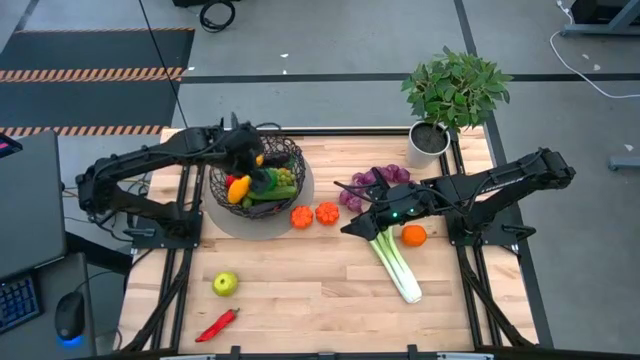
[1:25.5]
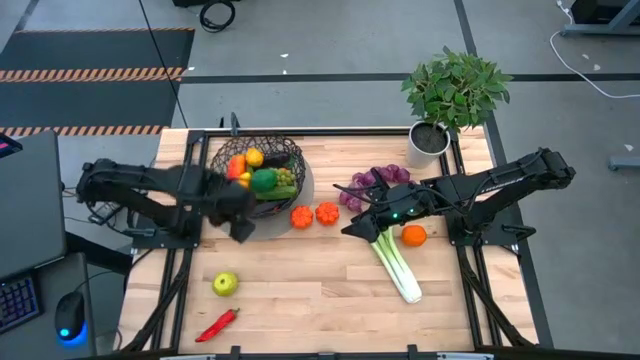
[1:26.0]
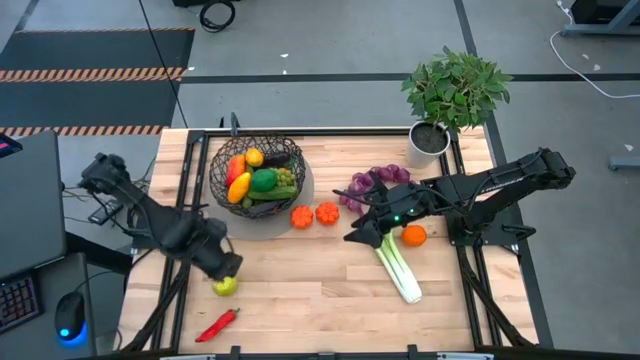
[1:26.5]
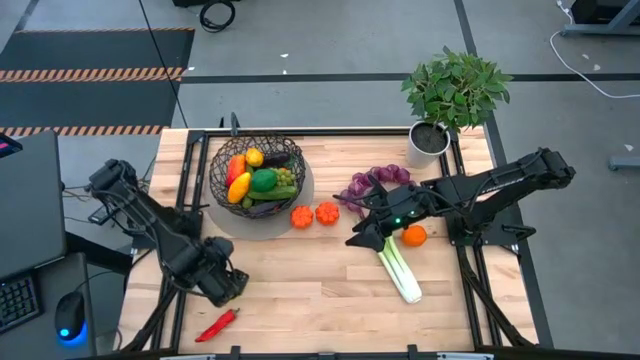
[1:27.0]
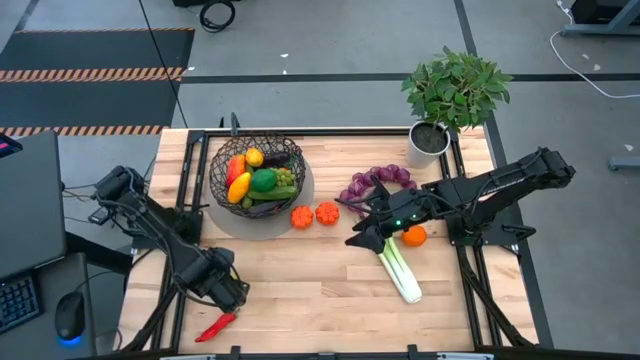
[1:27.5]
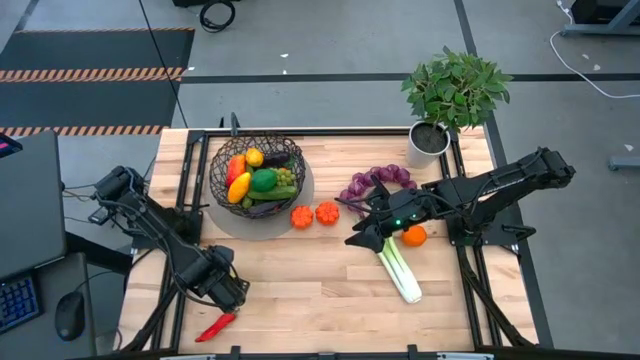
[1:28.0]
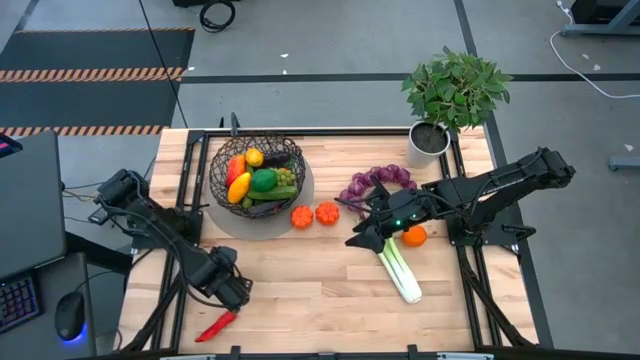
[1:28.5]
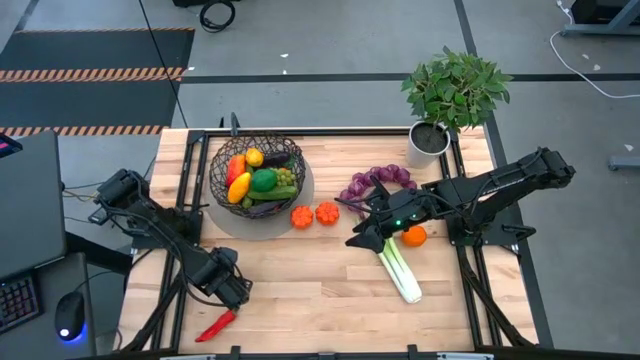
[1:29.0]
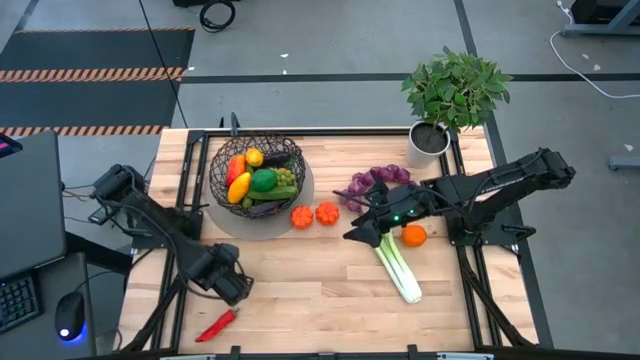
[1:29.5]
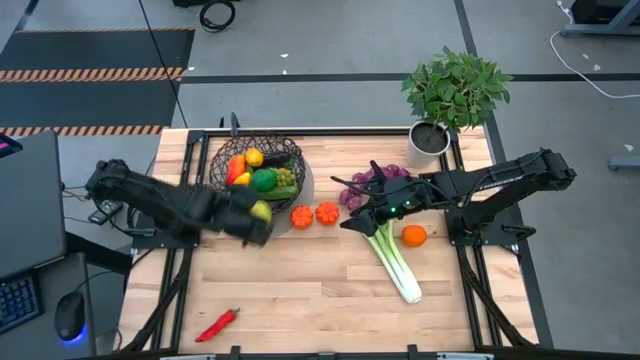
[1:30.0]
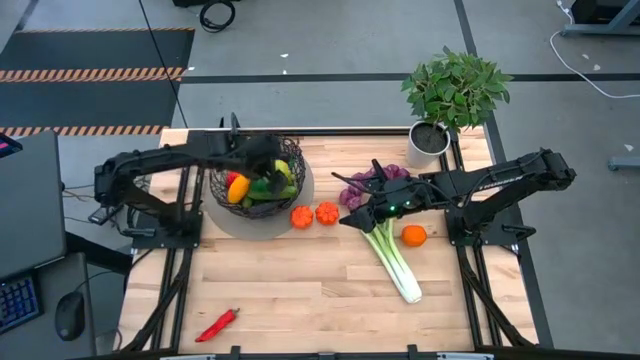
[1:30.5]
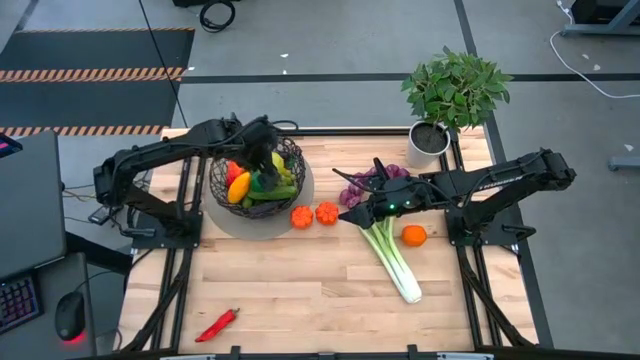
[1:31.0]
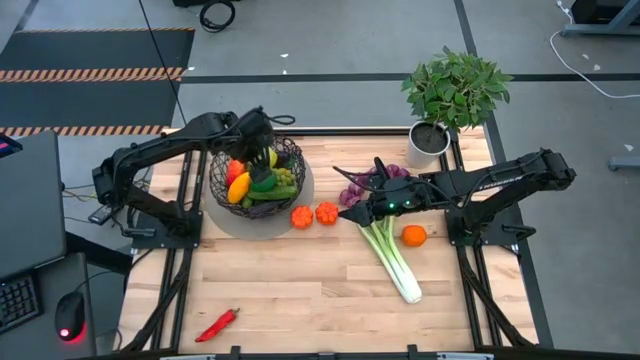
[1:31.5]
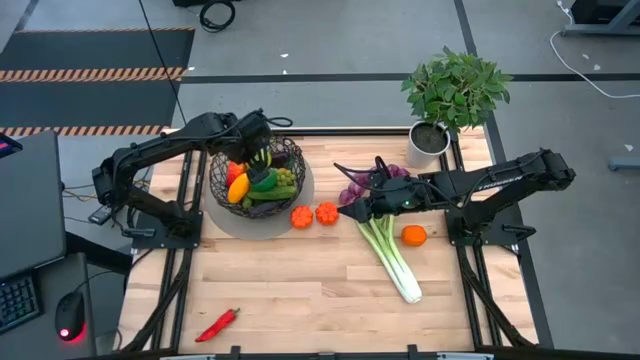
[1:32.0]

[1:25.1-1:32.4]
Task: Build produce basket
Put the green apple into the black wire basket

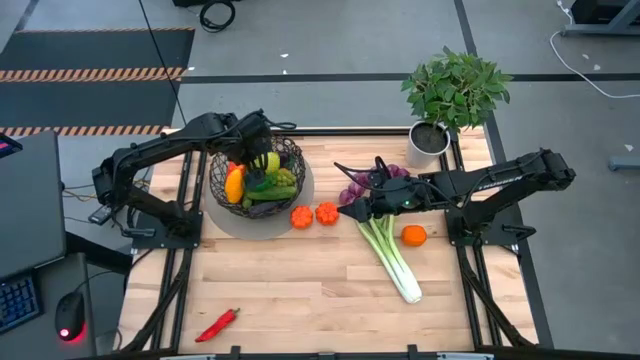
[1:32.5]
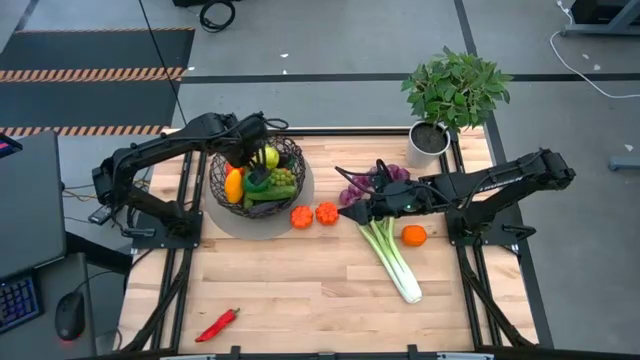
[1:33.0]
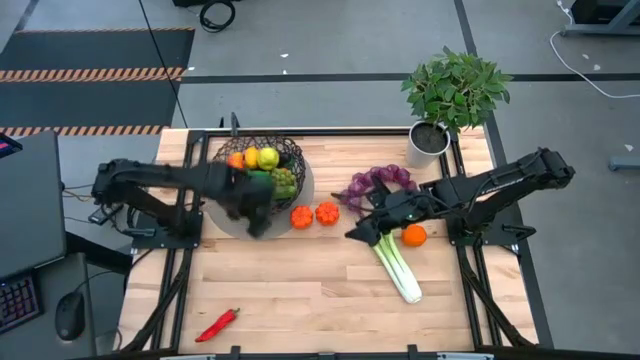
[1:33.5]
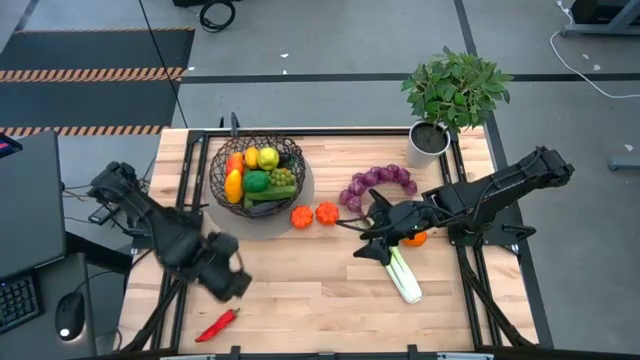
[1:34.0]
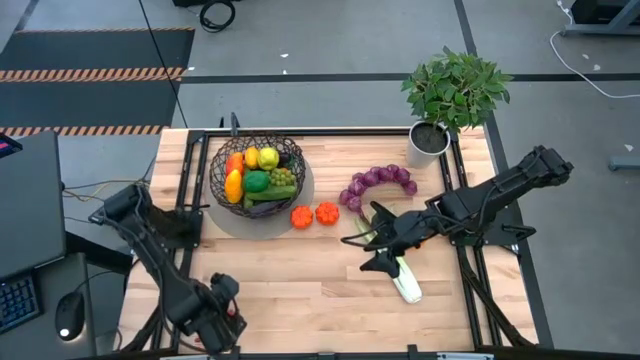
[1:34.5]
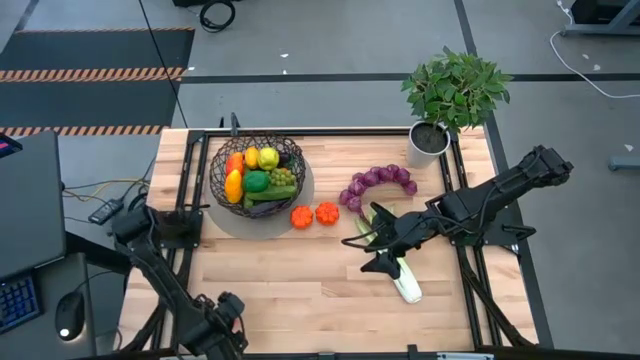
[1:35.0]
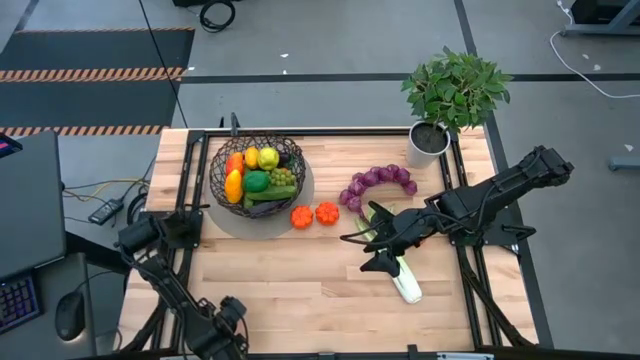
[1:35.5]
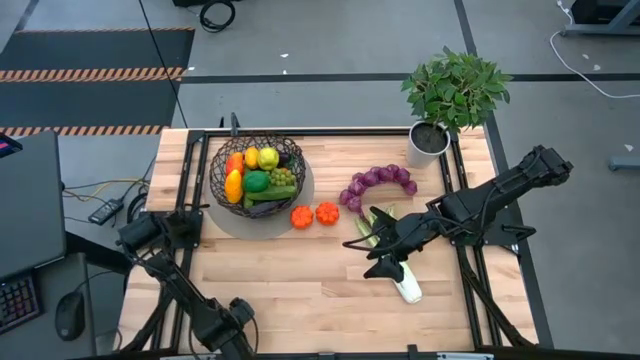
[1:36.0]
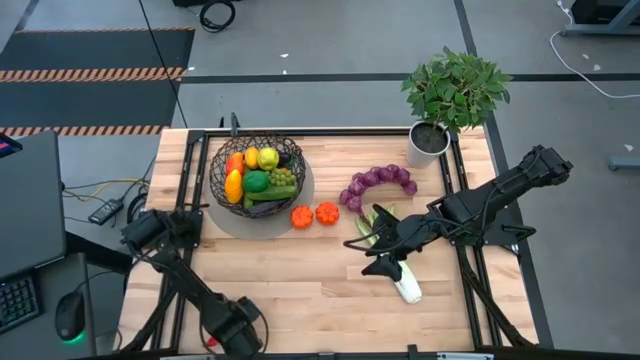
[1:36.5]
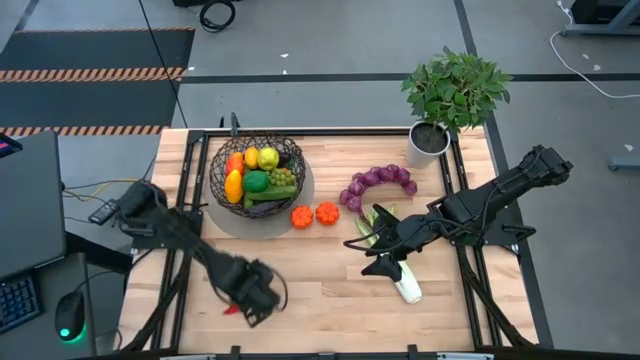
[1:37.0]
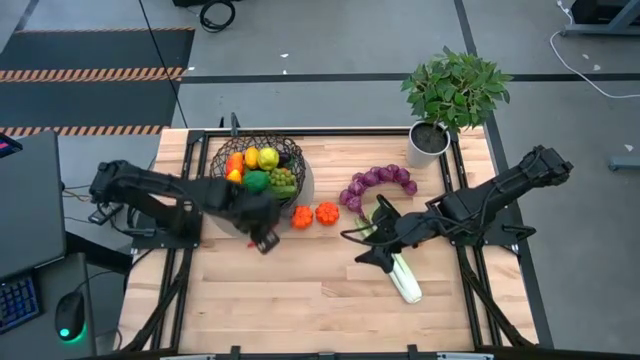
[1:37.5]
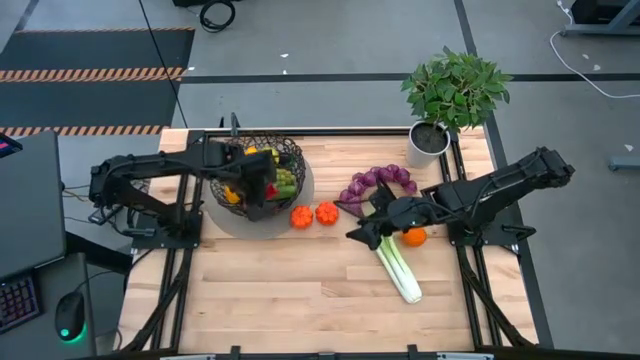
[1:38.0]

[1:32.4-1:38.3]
Put the red chili pepper into the black wire basket

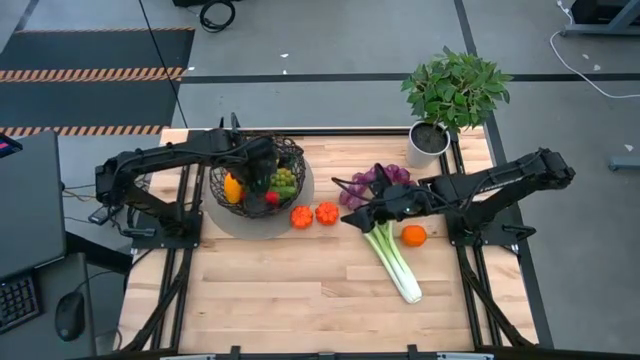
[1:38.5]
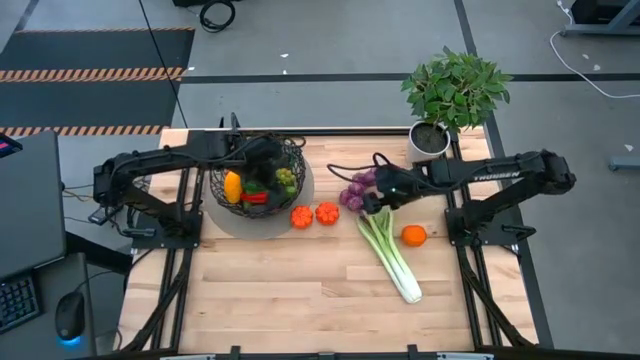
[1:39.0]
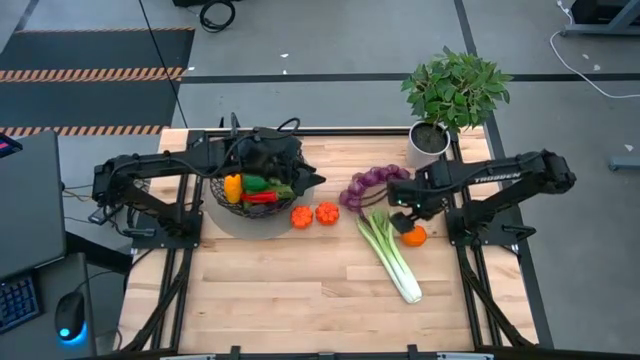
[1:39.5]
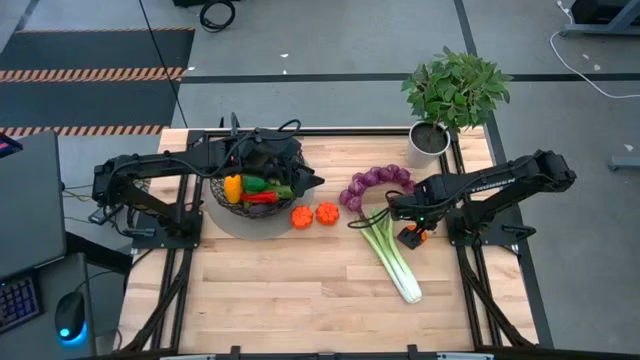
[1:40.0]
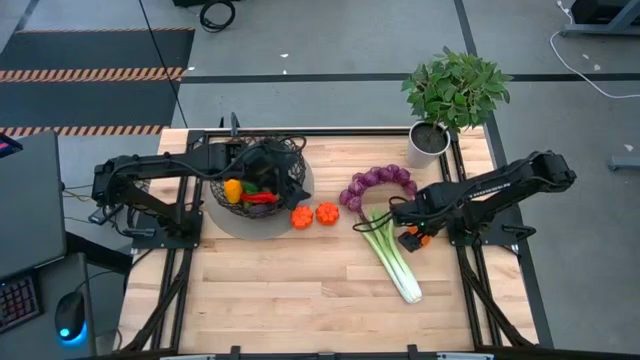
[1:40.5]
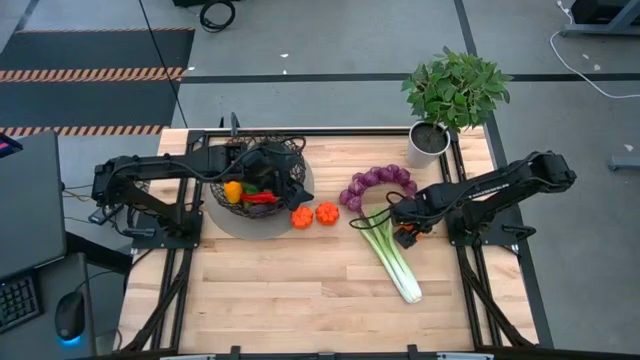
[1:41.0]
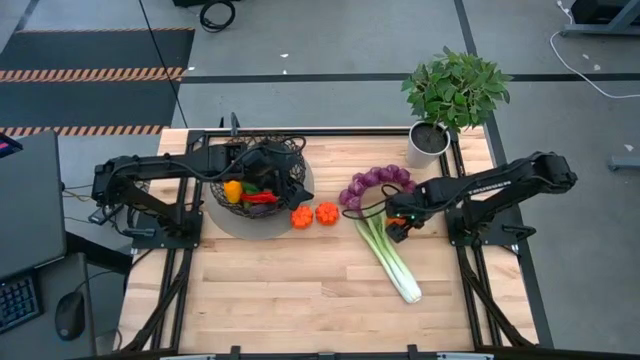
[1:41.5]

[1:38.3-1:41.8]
Put the orange into the black wire basket

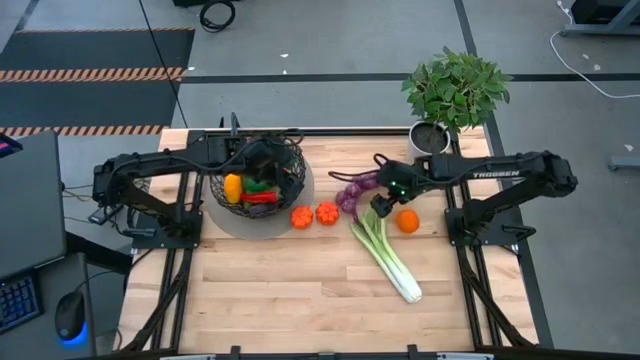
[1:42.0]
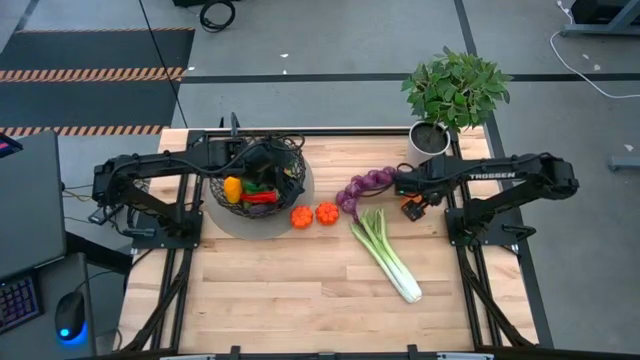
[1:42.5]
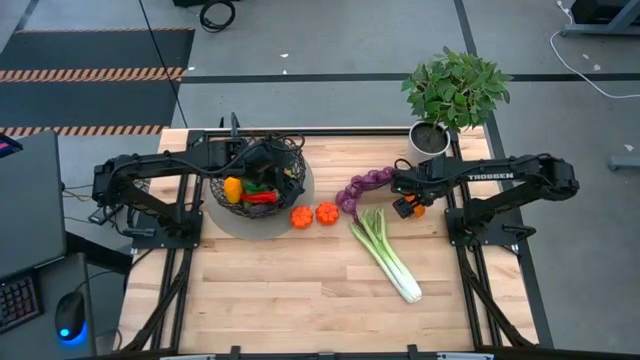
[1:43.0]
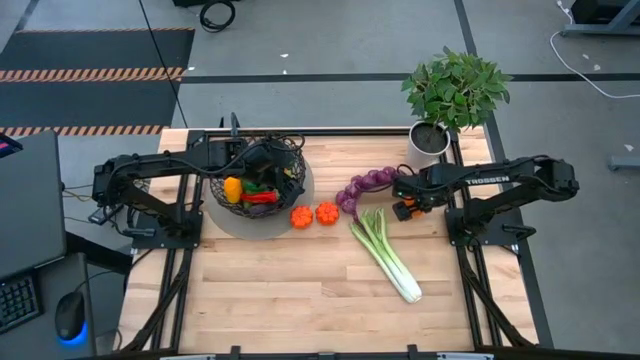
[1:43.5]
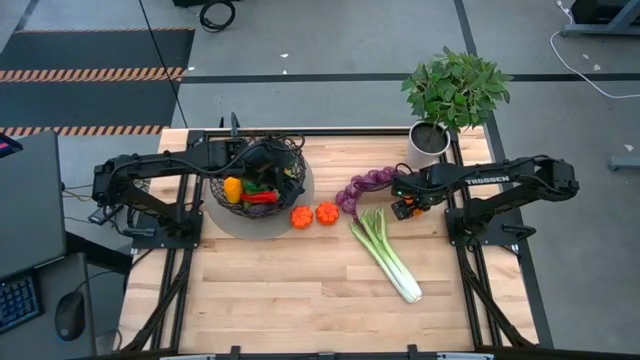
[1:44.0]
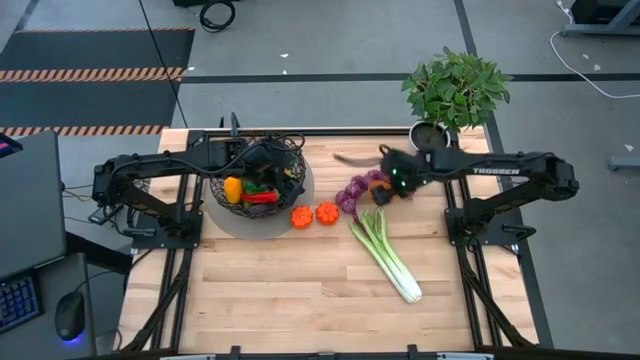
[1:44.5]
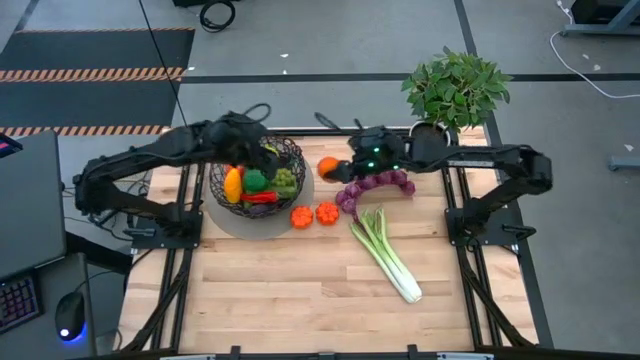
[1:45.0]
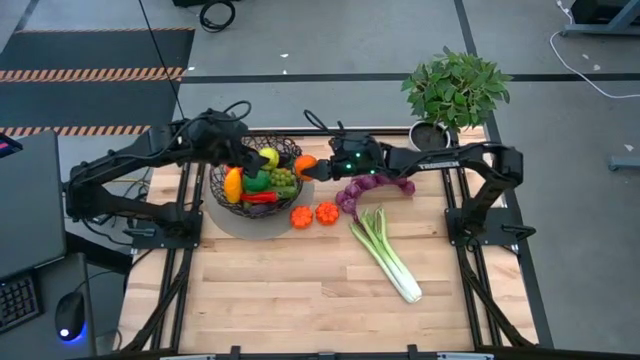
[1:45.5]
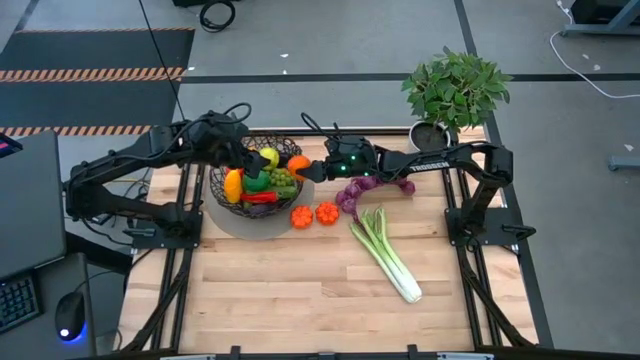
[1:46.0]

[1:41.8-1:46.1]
Put the orange into the black wire basket
